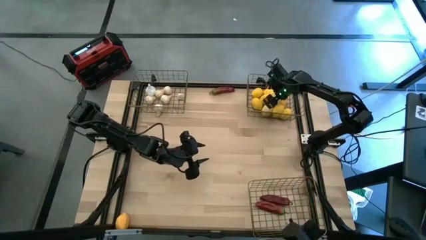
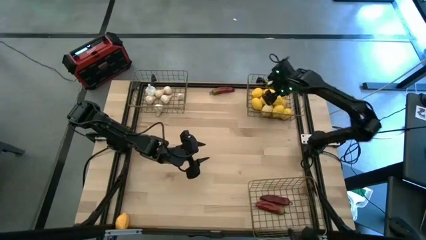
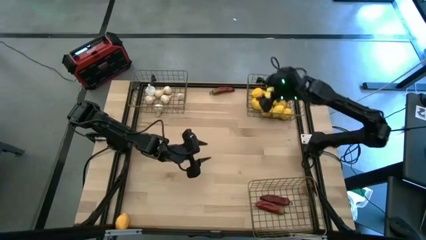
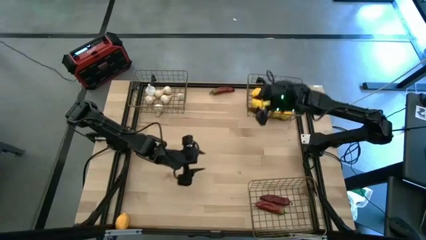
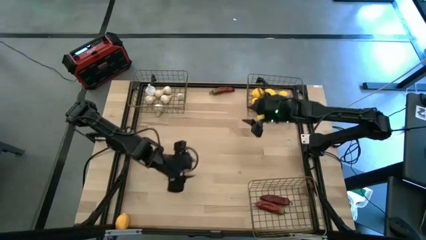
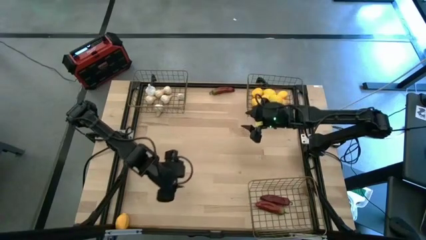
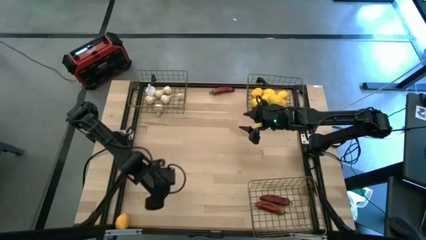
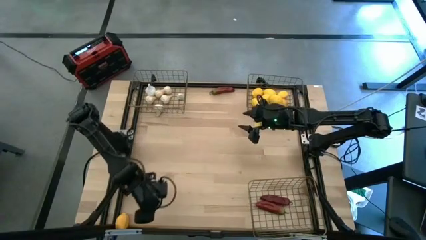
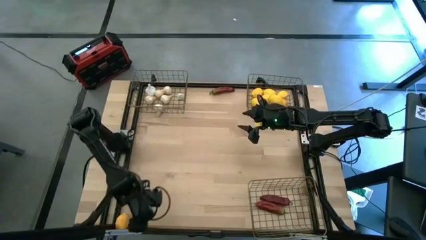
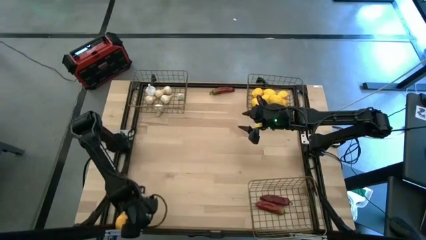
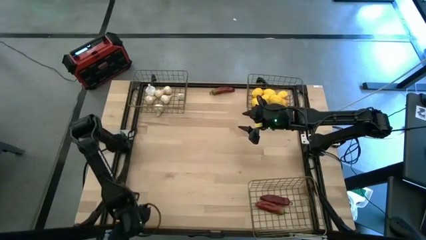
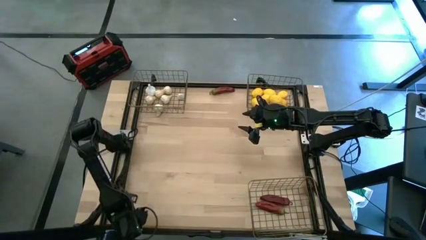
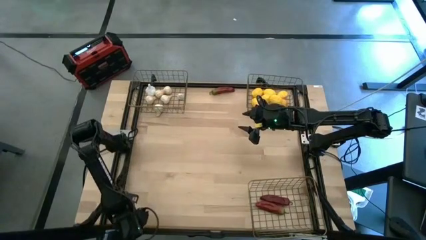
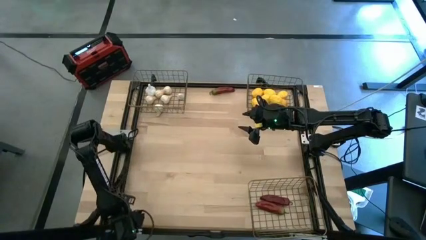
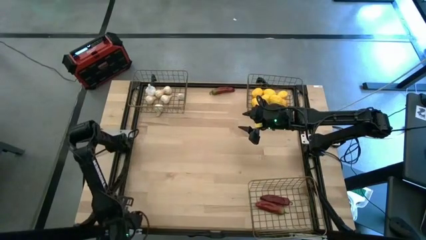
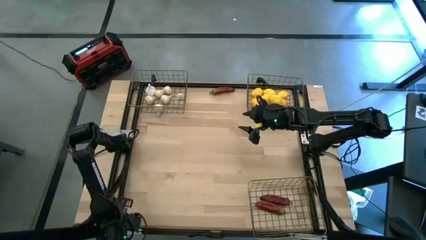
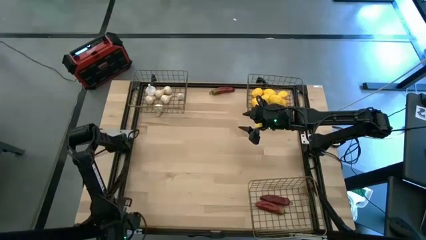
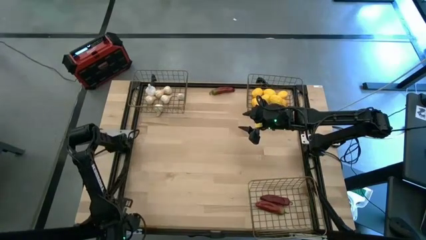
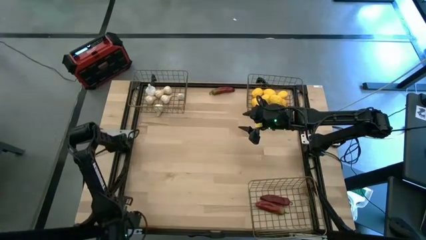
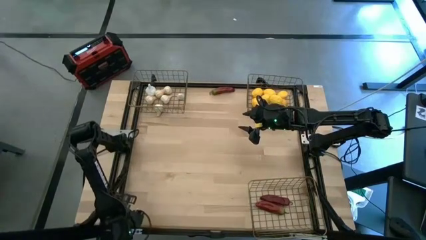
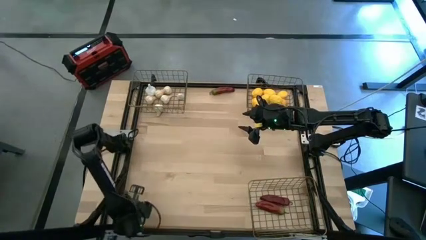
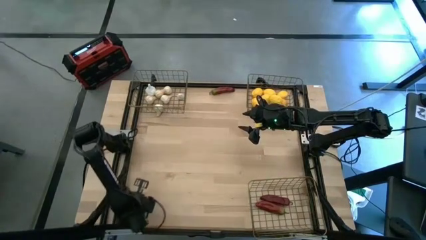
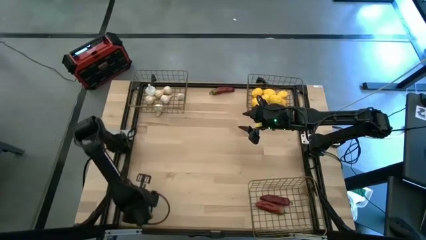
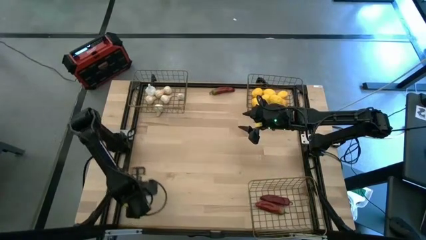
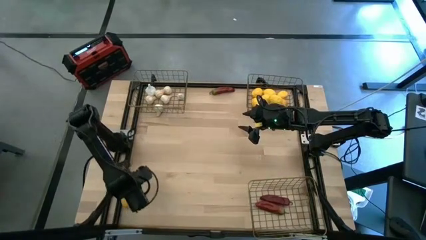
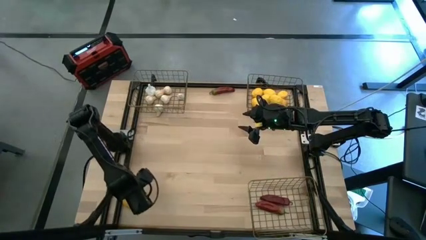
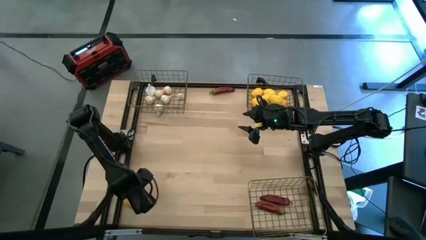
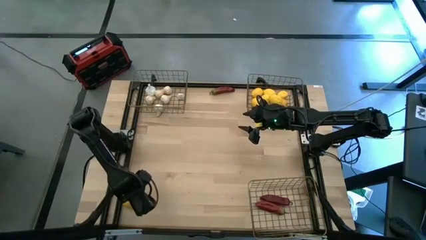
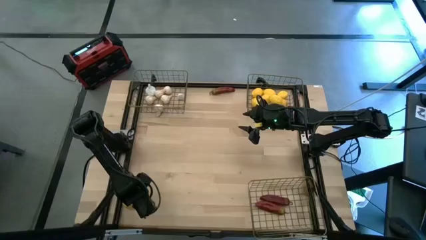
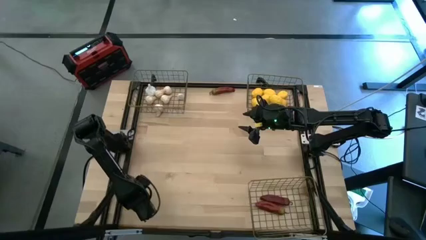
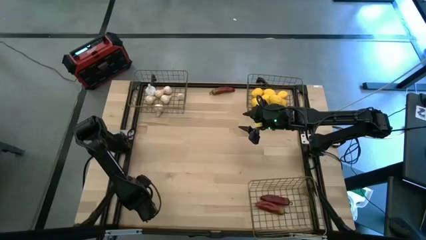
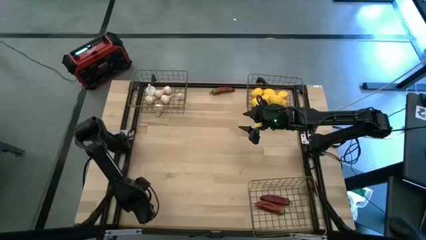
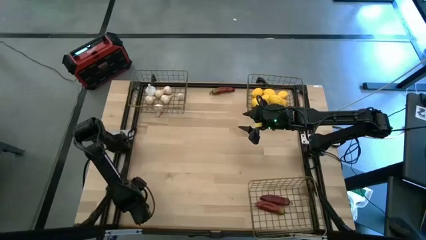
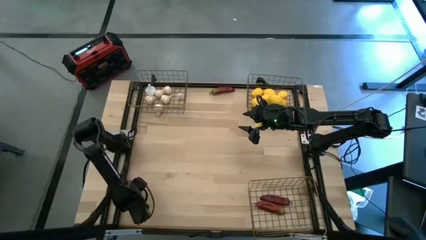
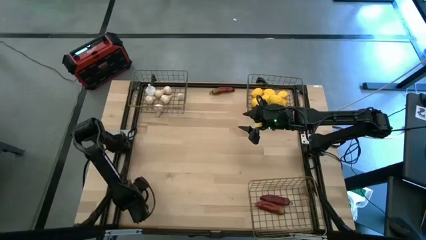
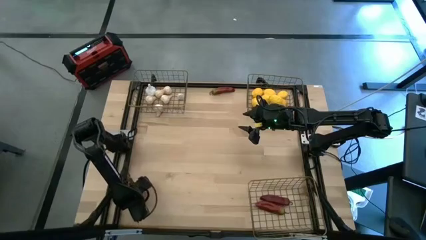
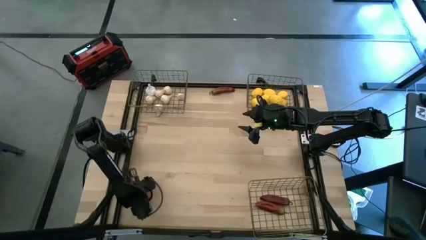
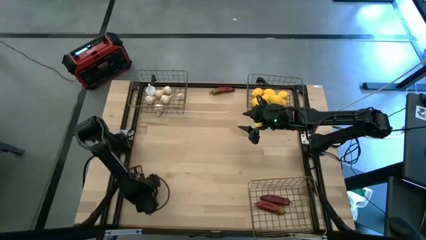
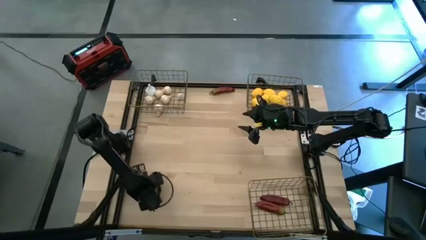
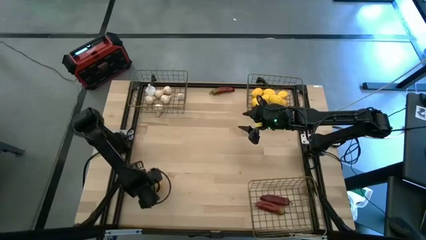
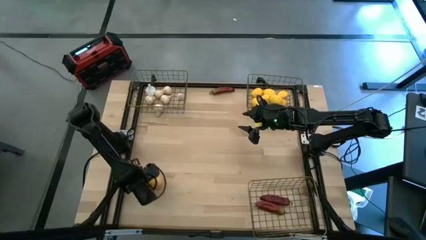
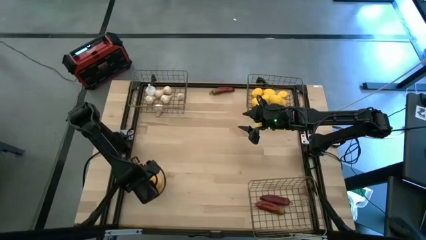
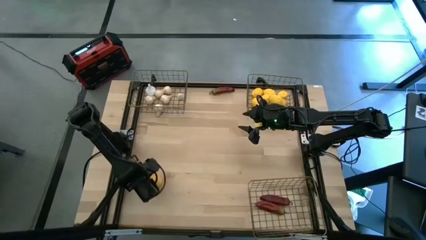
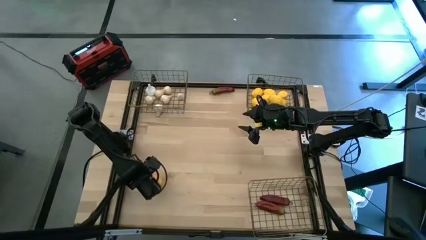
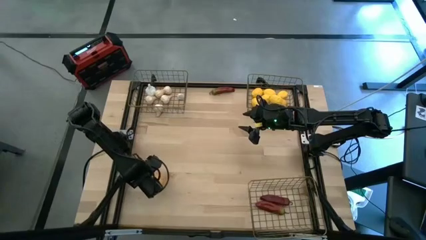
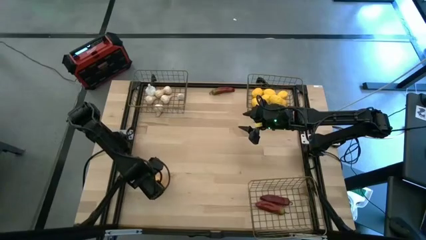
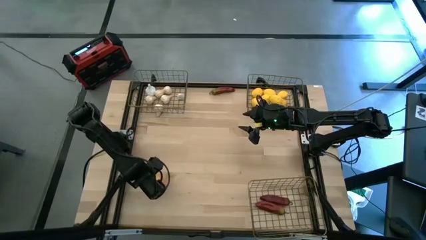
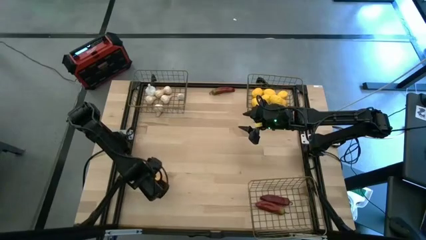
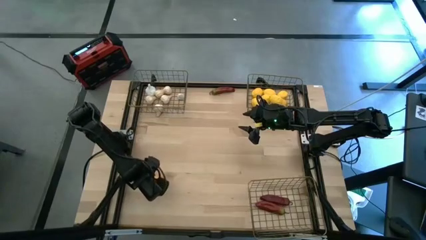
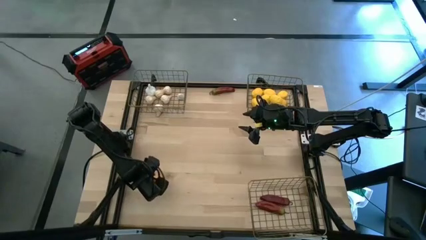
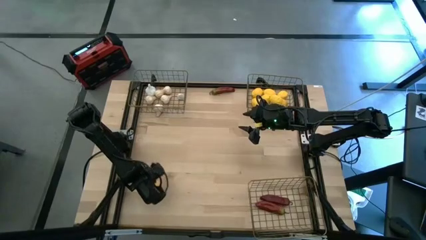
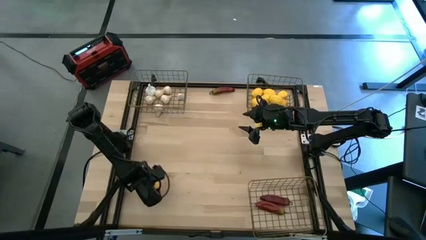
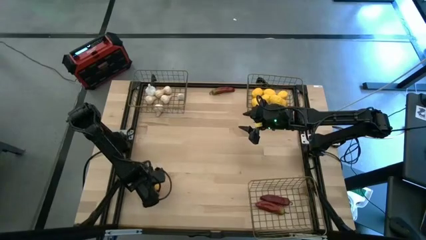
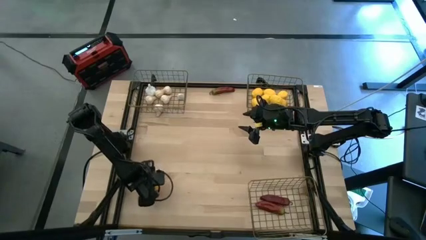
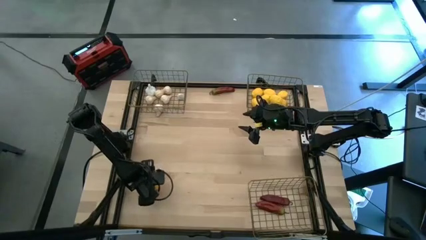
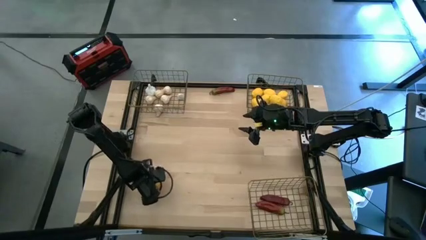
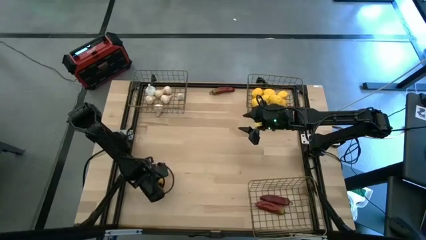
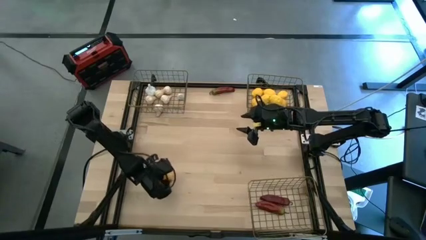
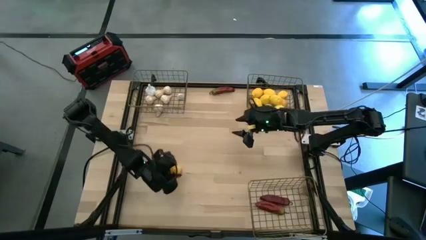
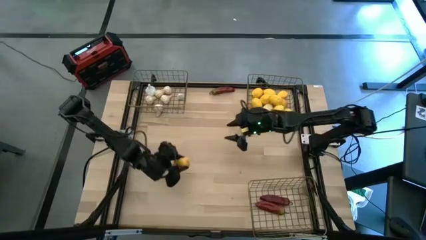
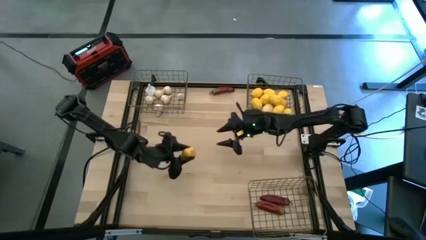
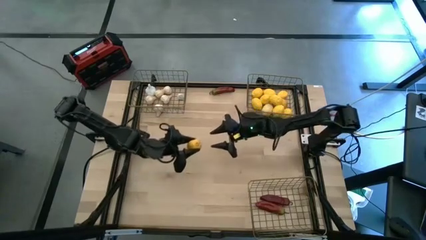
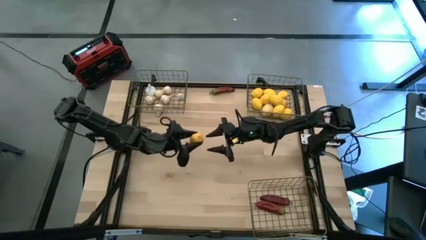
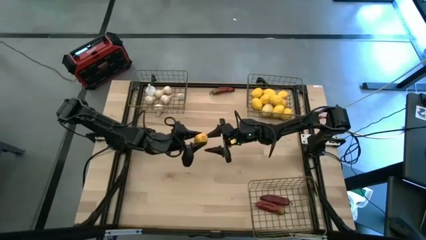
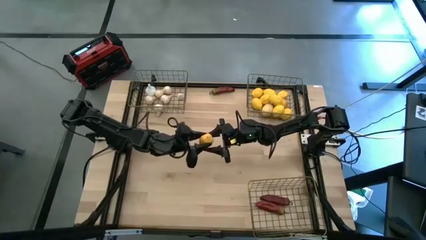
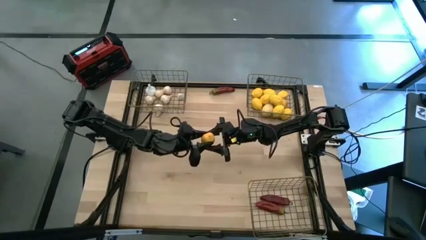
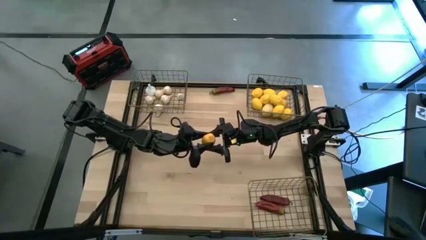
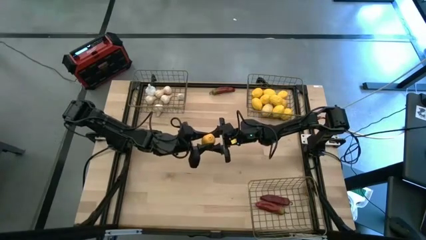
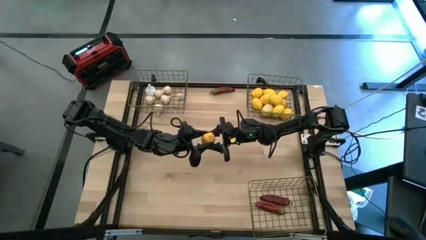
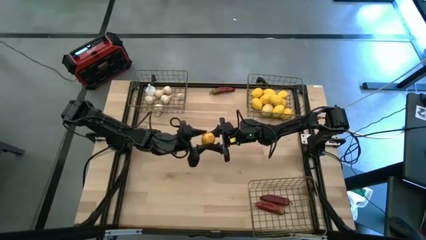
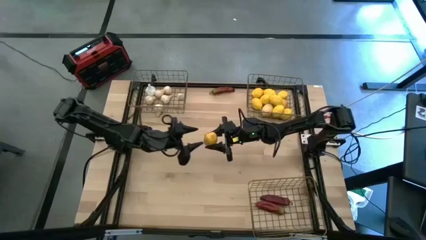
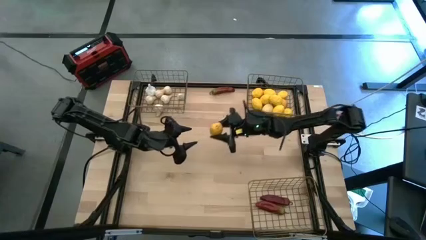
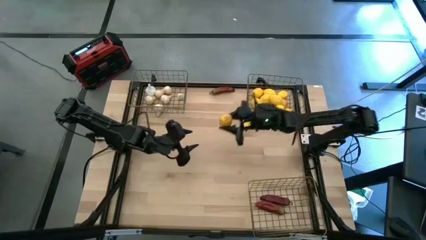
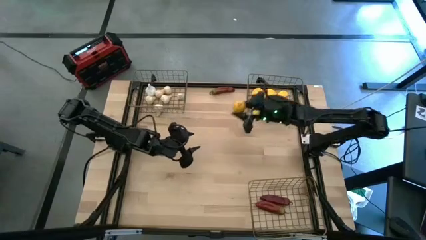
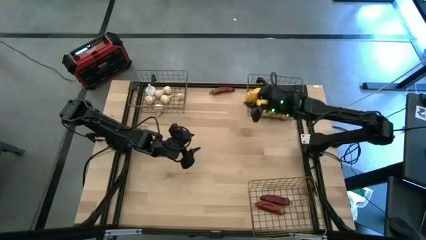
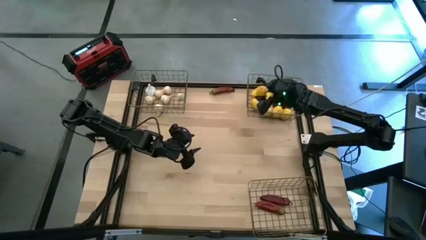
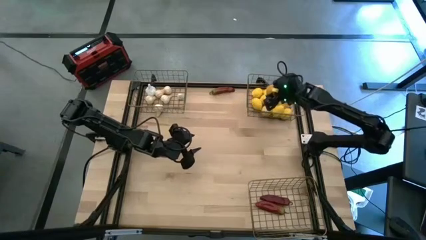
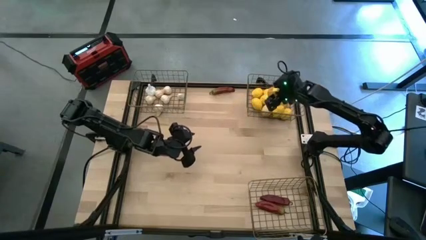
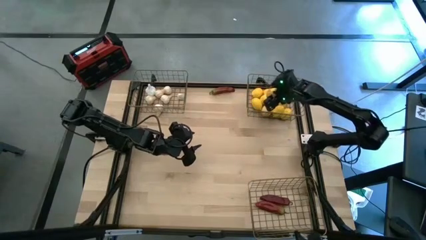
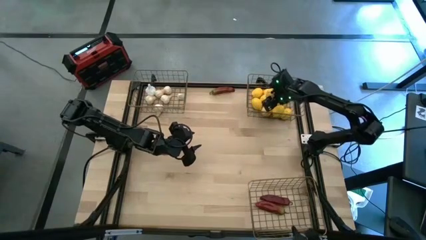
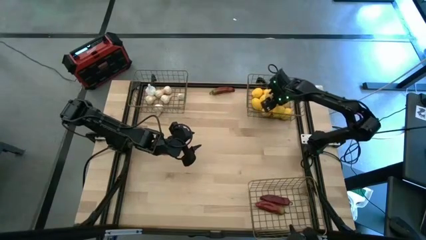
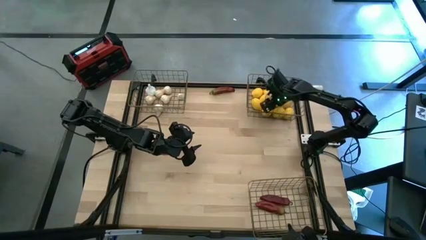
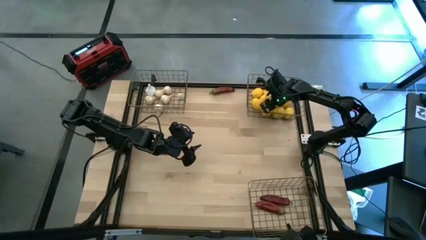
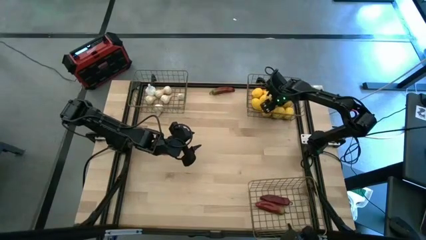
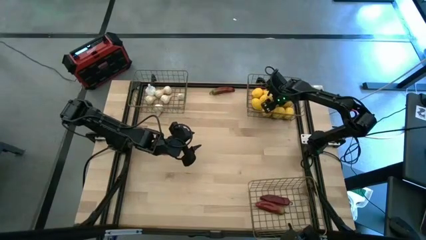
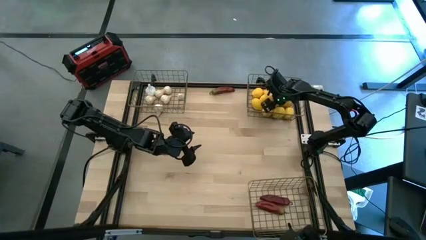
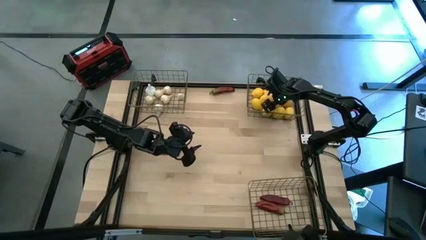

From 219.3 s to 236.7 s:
Task: Sort produce into baskets
Put the yellow lemon into the top right wire basket
